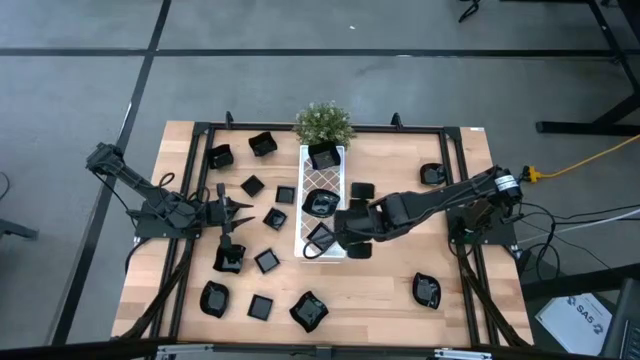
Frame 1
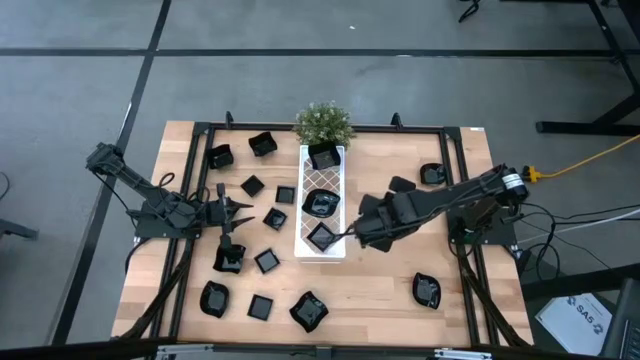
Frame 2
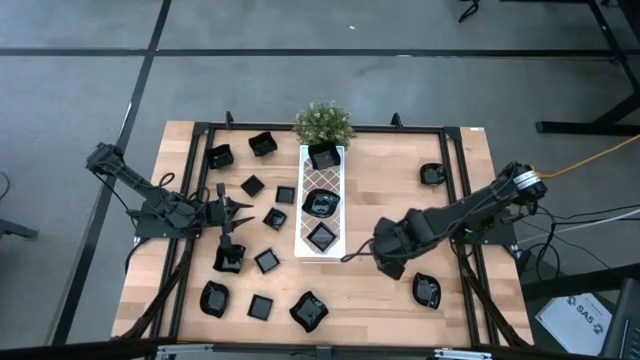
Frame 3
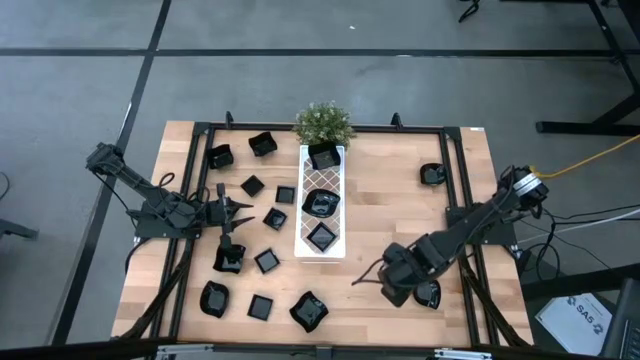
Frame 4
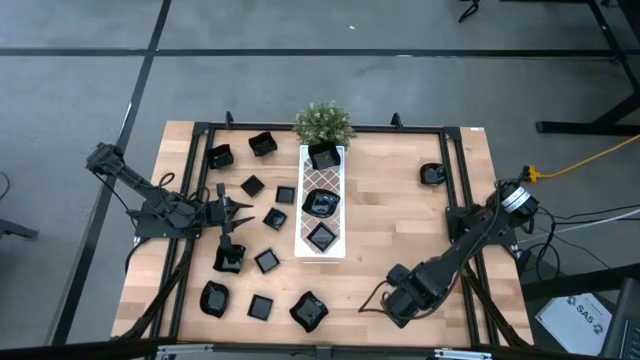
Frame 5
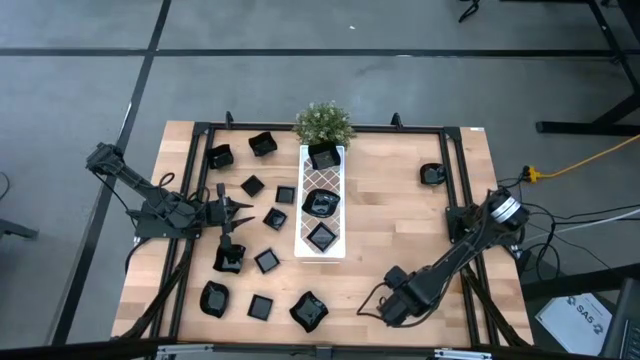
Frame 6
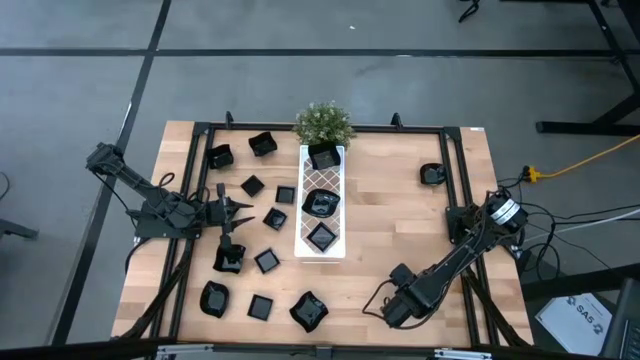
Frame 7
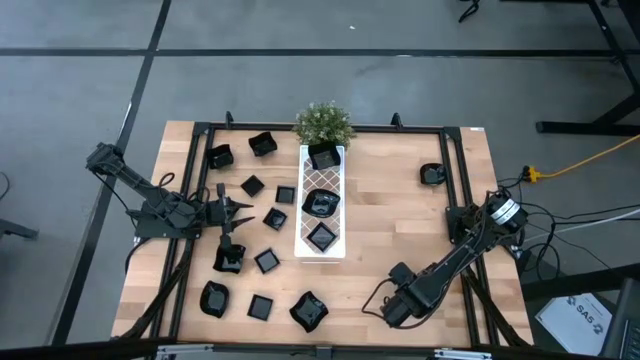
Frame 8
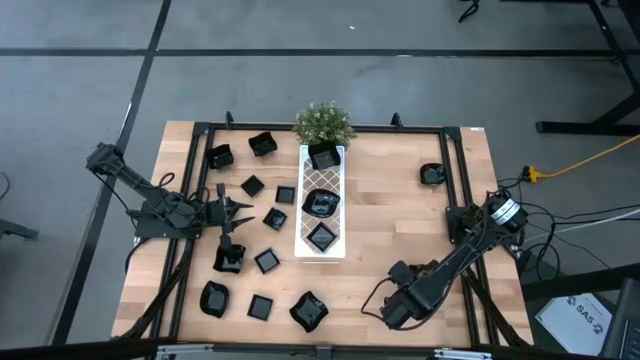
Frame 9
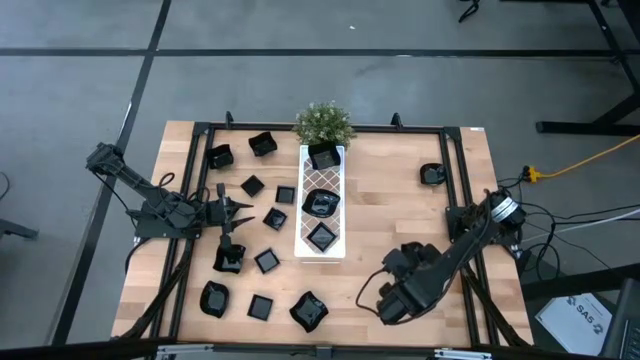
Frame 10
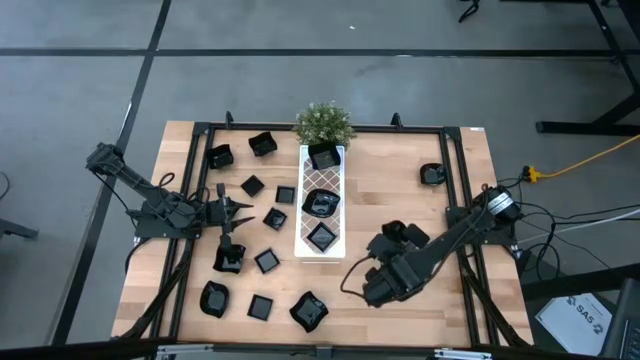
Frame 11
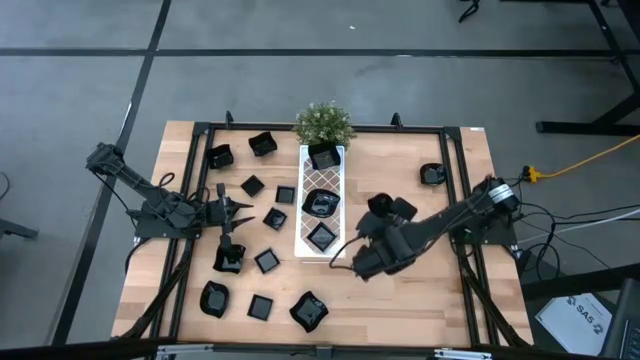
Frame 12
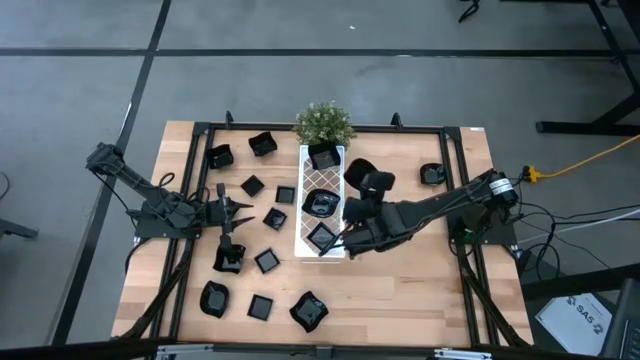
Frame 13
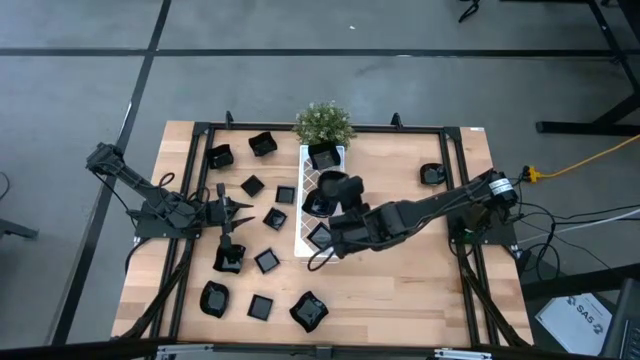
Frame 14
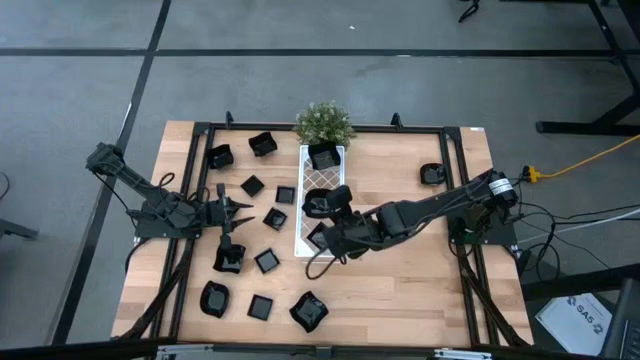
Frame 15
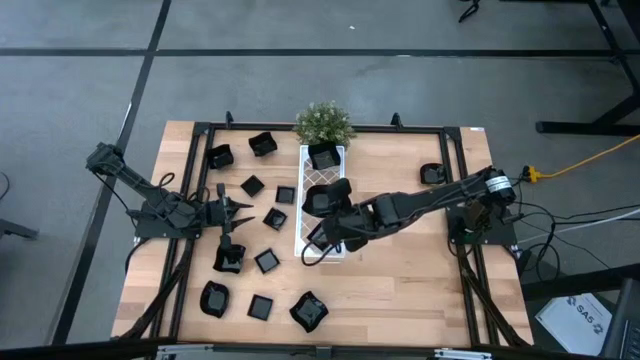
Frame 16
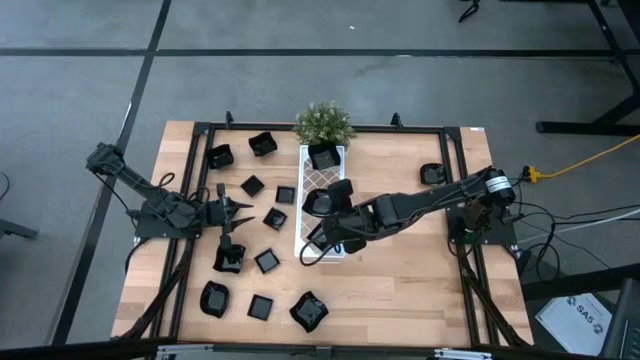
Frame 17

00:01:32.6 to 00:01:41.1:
Task: Pick & Place Mini shaped plates
Stack the leaf shape plate on top of the leaf shape plate on the shelf

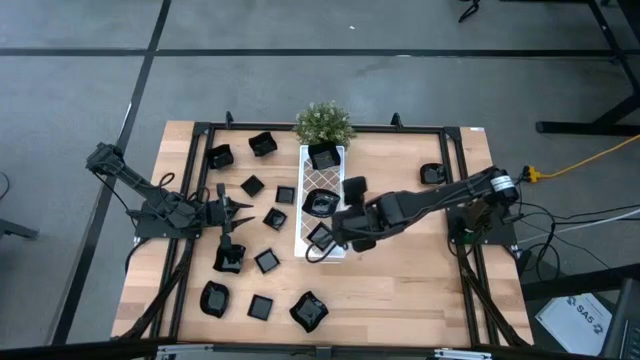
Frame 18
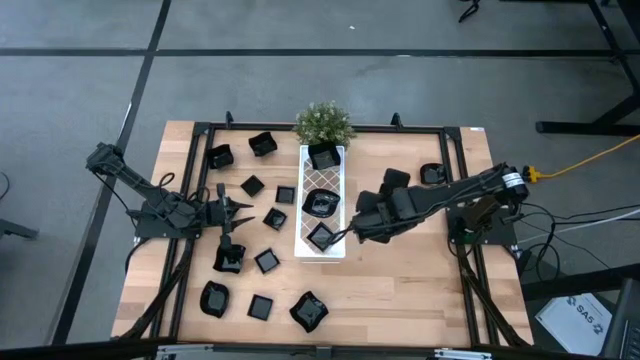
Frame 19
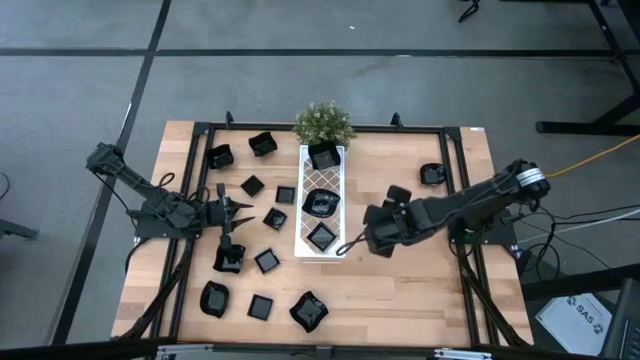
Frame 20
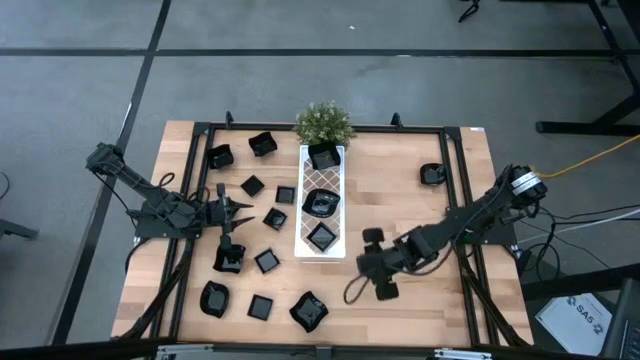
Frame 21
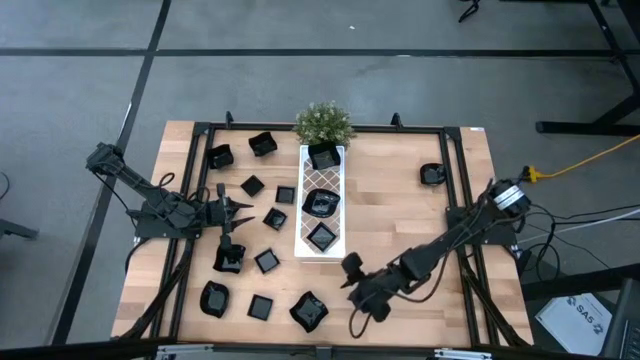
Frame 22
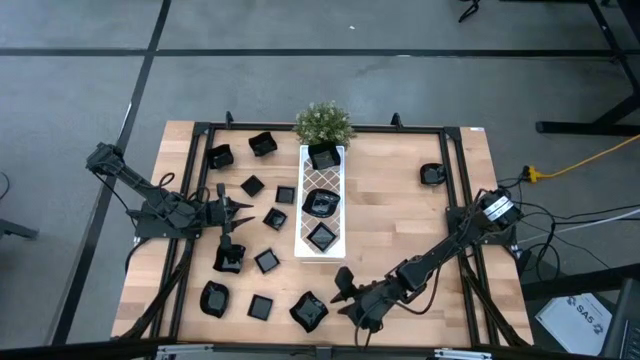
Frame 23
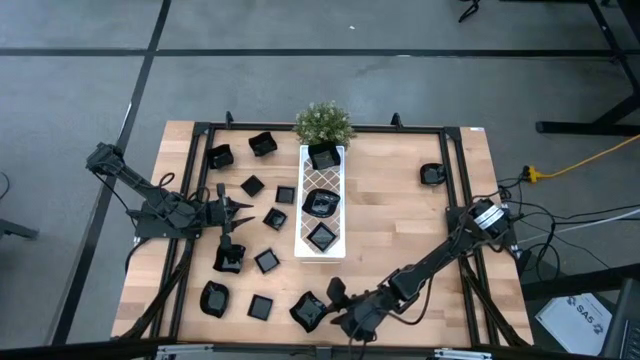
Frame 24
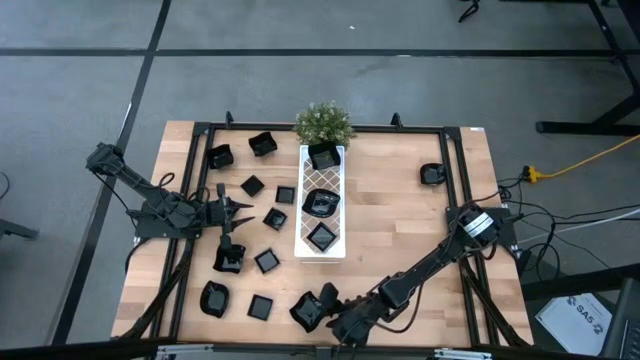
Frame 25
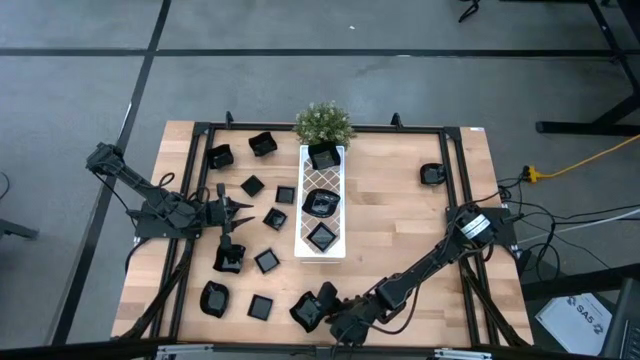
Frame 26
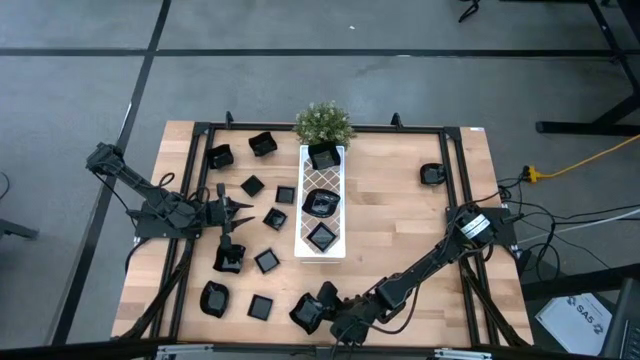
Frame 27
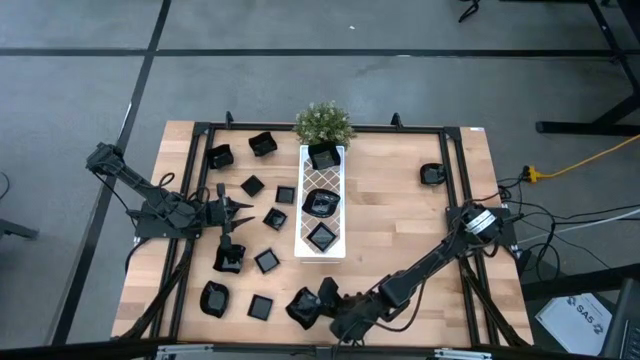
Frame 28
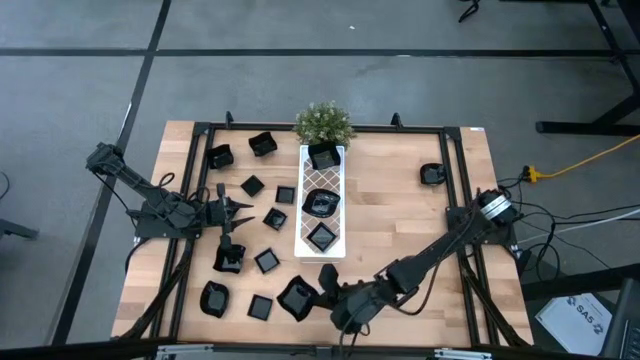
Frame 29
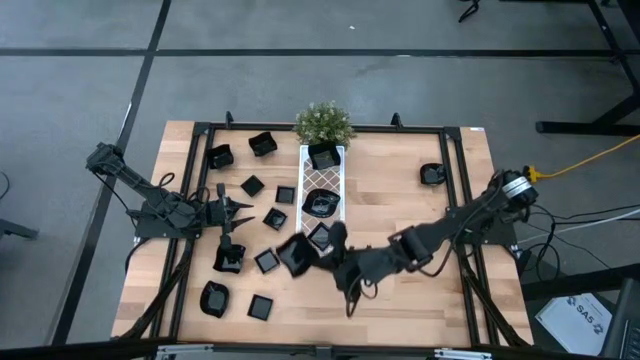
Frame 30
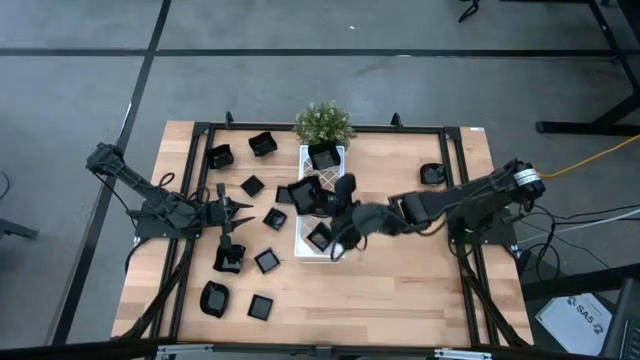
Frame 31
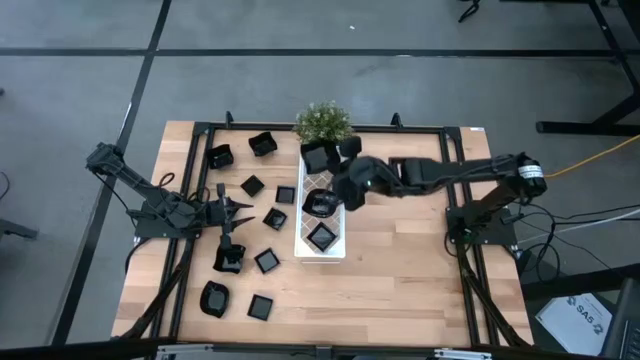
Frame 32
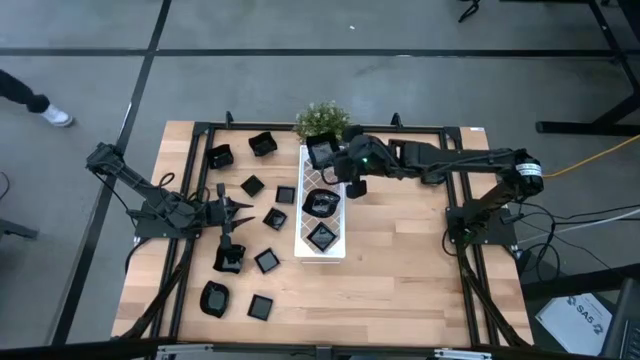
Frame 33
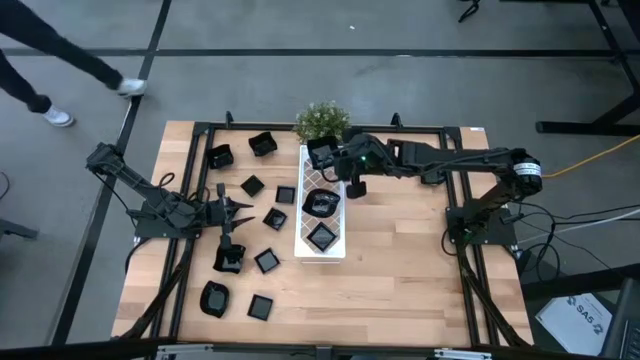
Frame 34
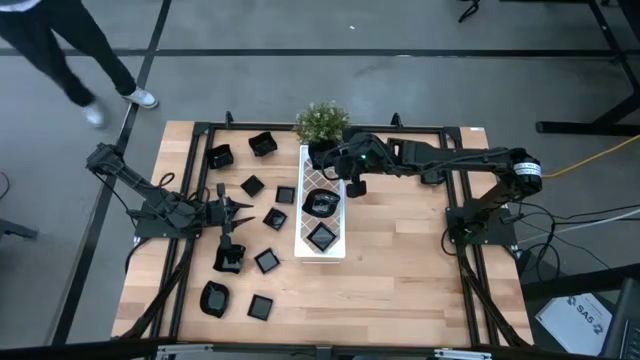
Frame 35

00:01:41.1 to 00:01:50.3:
Stack the distorted square plate on top of the distorted square plate on the shelf

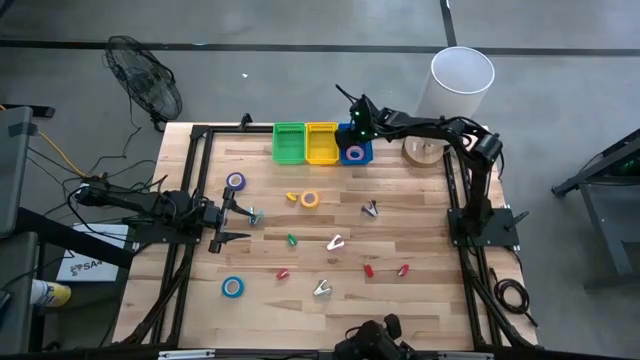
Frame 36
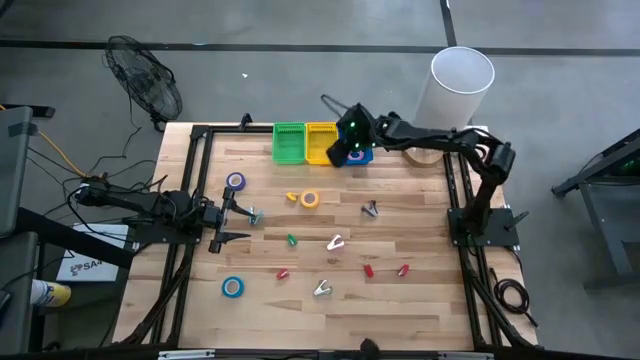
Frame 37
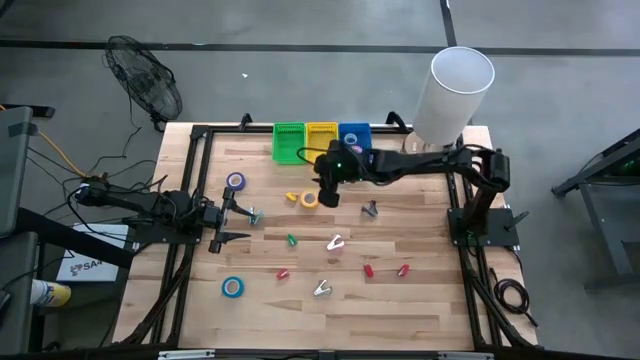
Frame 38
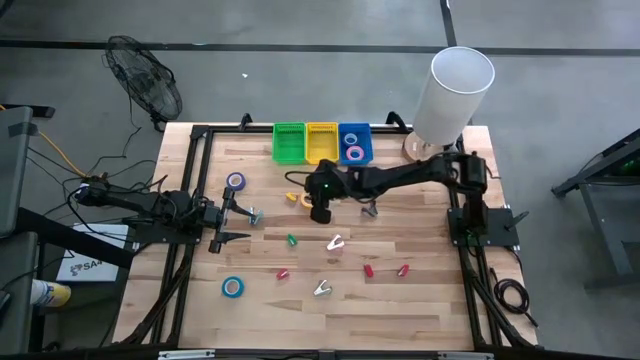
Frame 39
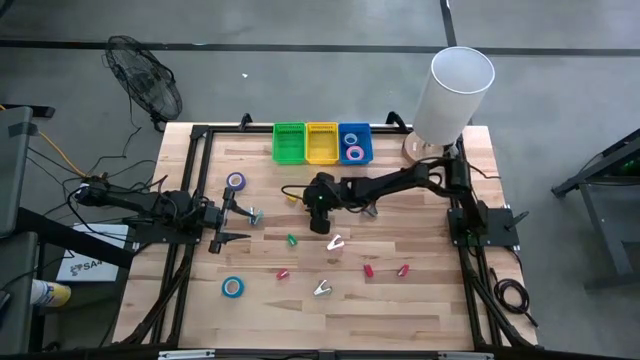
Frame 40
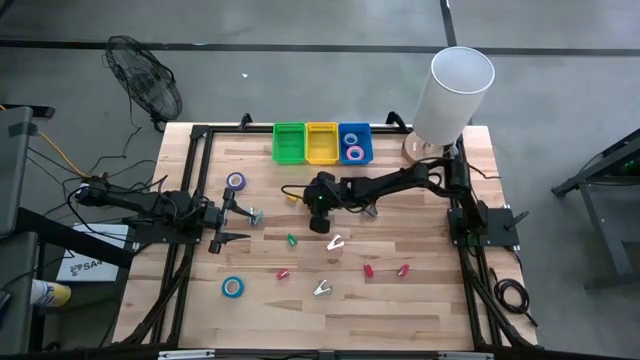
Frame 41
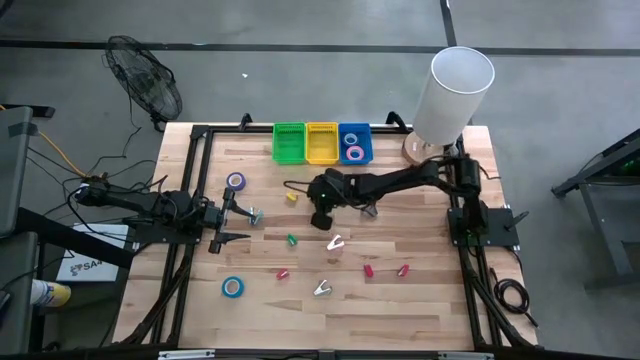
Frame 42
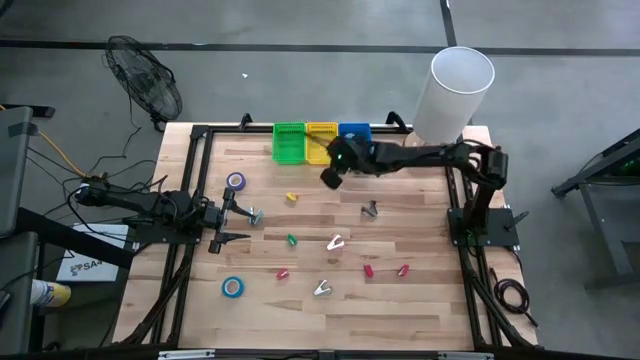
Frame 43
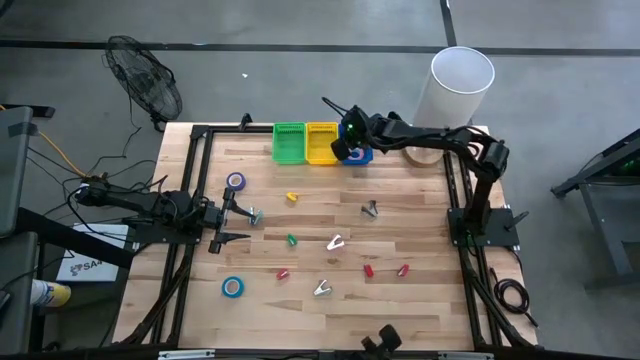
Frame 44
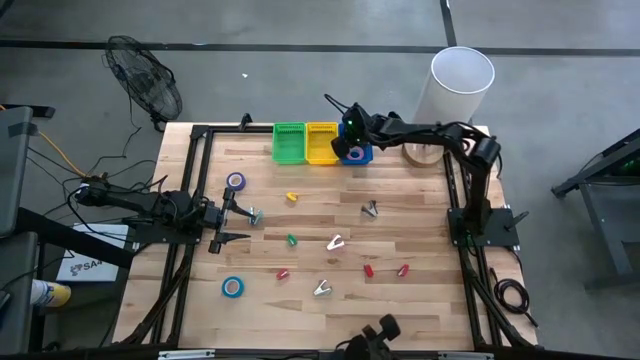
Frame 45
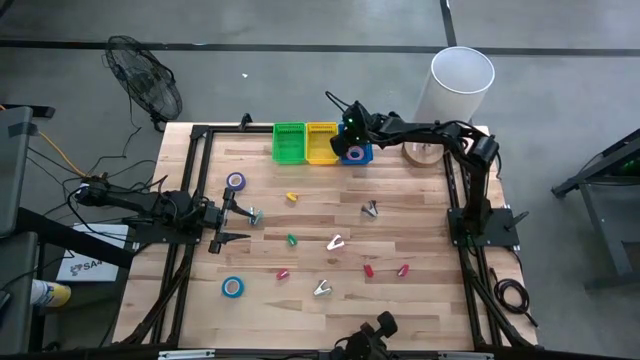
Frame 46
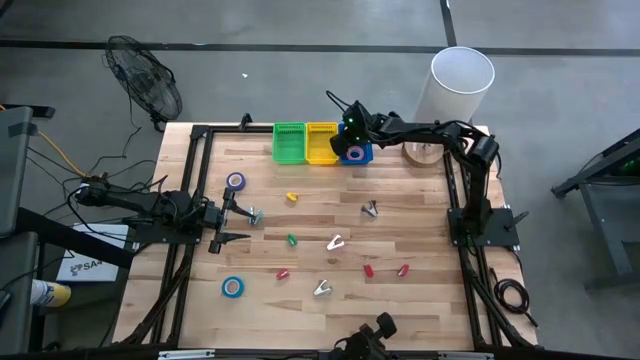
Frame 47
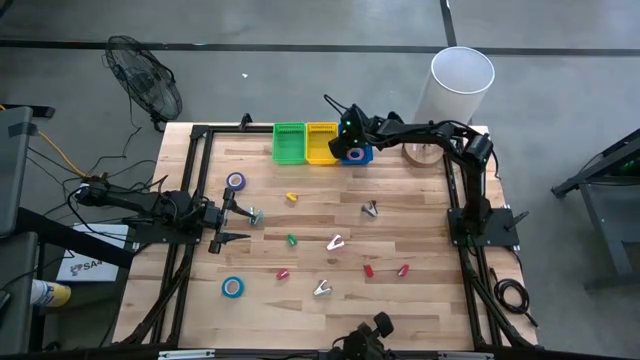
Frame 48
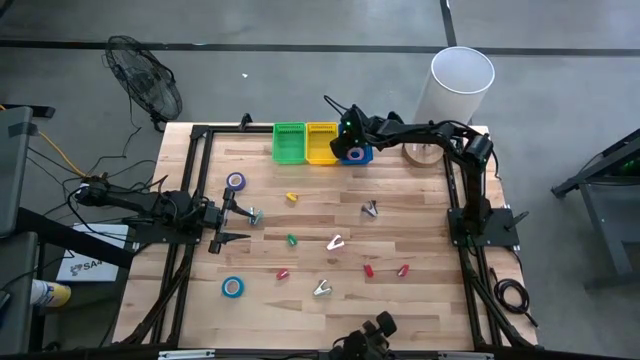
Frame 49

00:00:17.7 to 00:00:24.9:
Task: Pick and place Stapler, Stapler remover, tape
Put the yellow tape into the blue bin
